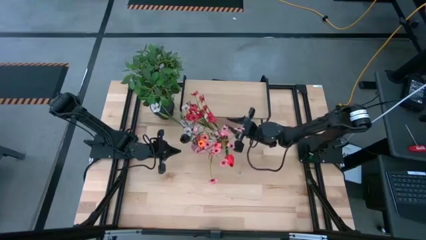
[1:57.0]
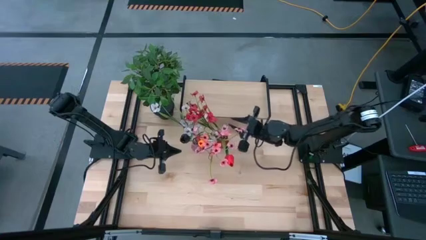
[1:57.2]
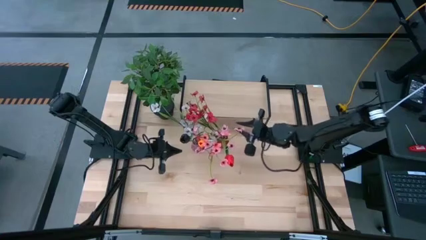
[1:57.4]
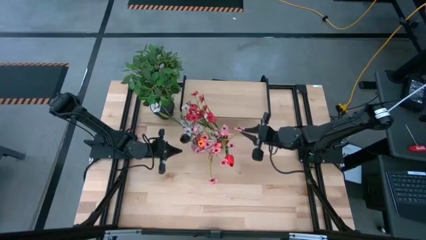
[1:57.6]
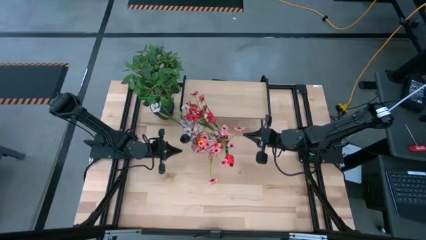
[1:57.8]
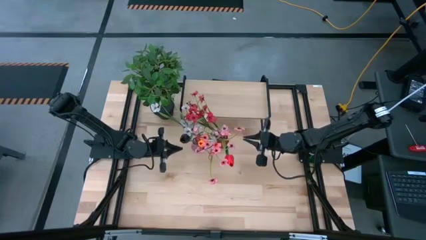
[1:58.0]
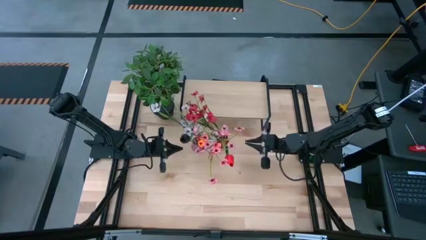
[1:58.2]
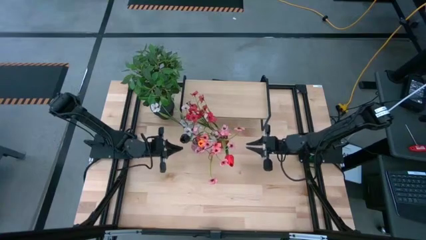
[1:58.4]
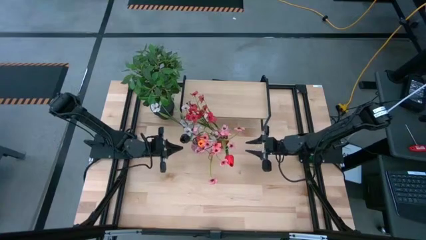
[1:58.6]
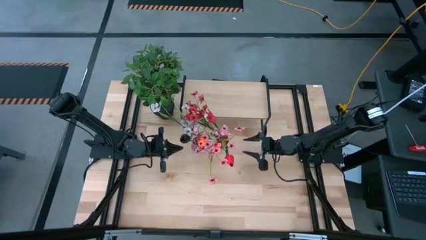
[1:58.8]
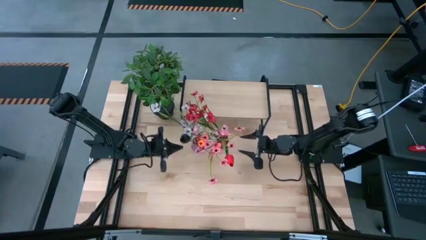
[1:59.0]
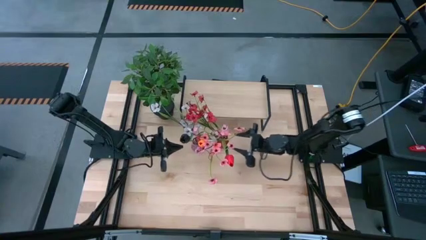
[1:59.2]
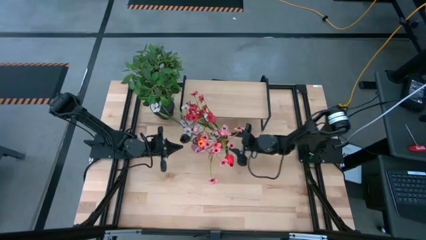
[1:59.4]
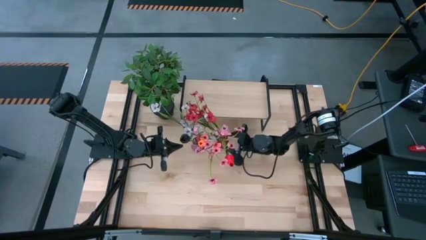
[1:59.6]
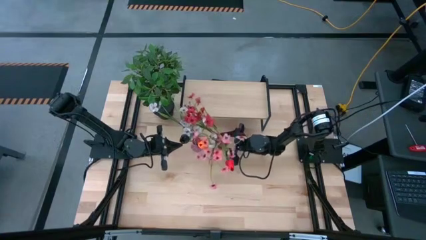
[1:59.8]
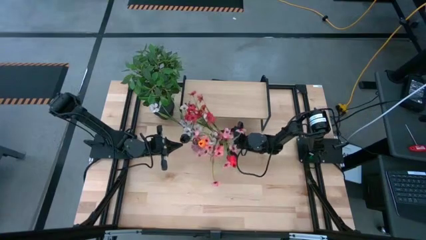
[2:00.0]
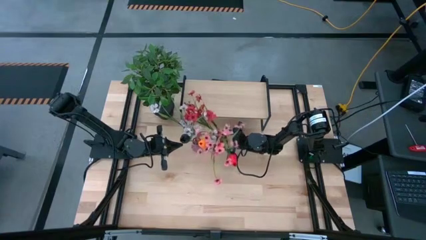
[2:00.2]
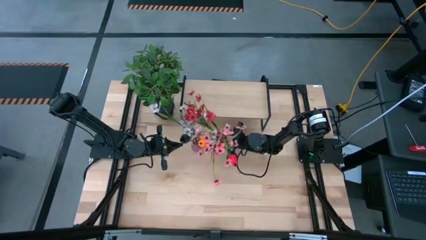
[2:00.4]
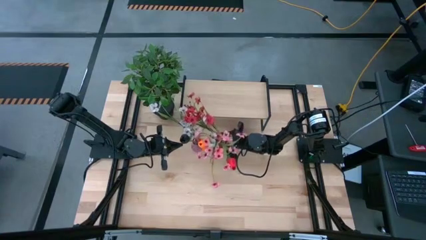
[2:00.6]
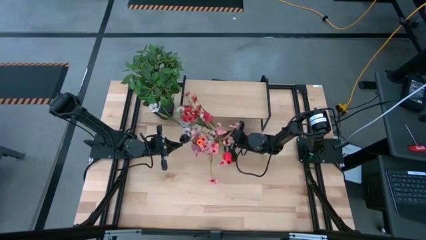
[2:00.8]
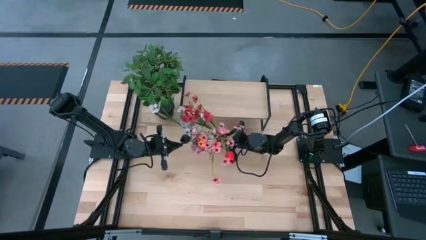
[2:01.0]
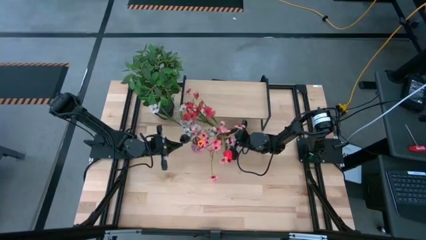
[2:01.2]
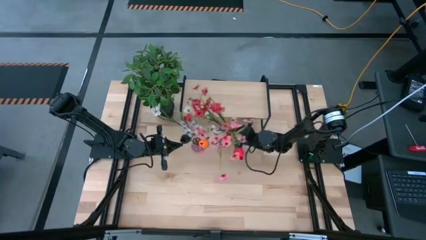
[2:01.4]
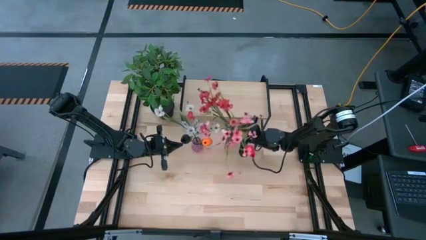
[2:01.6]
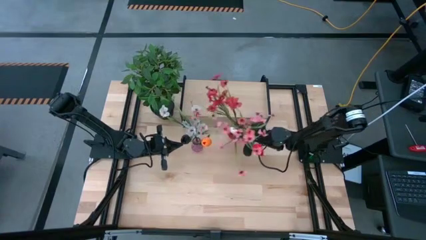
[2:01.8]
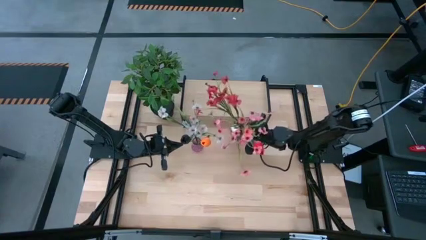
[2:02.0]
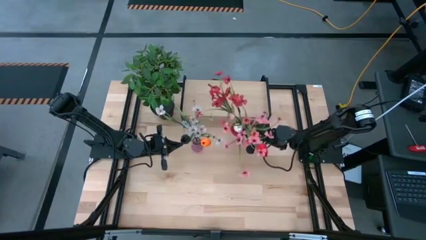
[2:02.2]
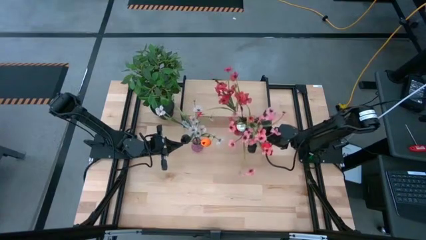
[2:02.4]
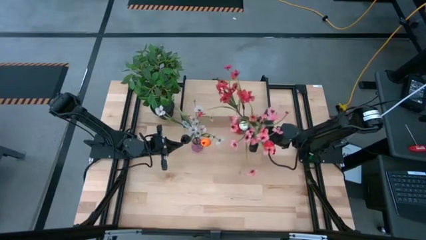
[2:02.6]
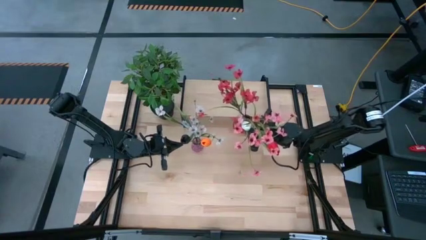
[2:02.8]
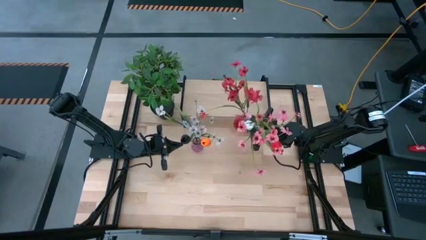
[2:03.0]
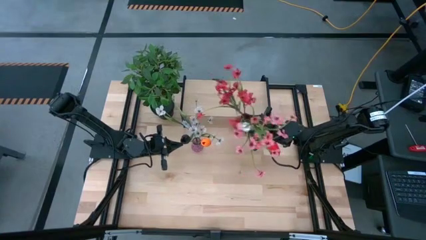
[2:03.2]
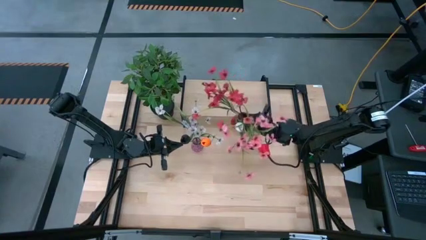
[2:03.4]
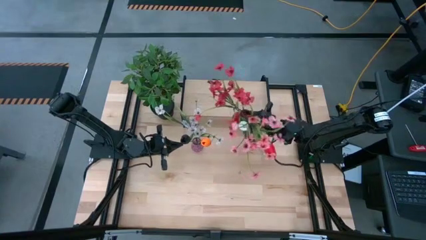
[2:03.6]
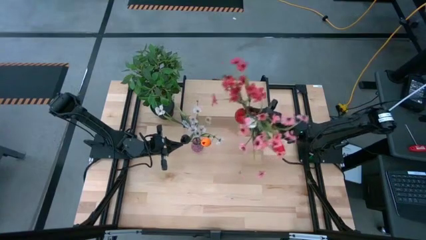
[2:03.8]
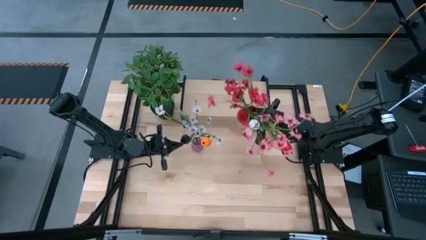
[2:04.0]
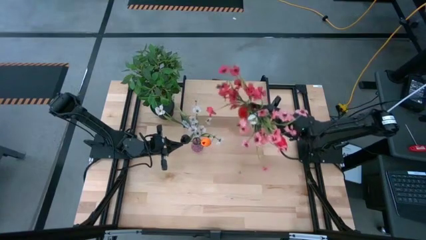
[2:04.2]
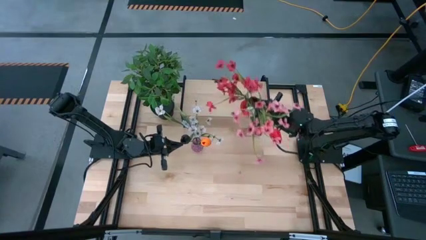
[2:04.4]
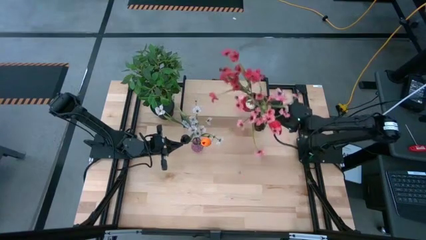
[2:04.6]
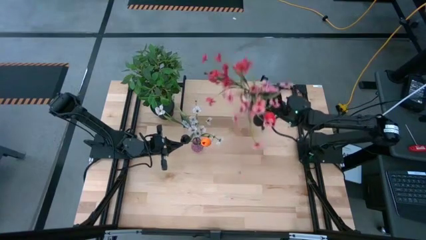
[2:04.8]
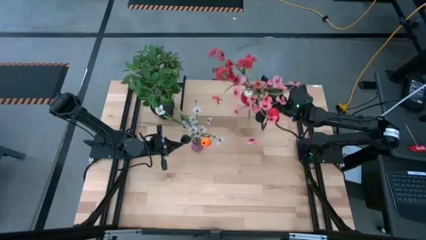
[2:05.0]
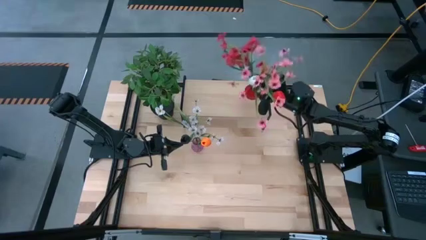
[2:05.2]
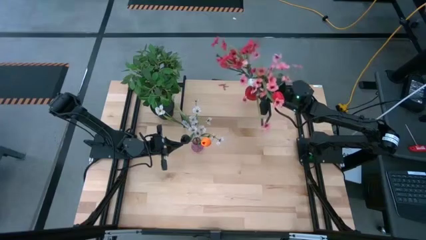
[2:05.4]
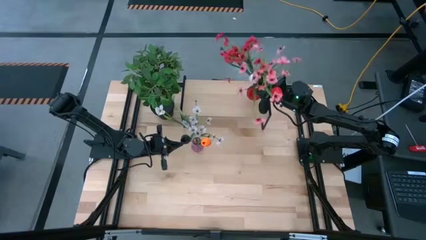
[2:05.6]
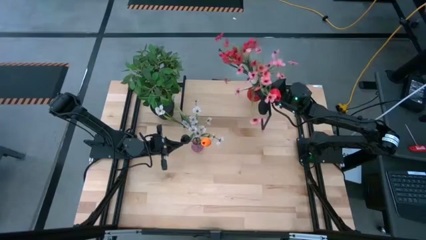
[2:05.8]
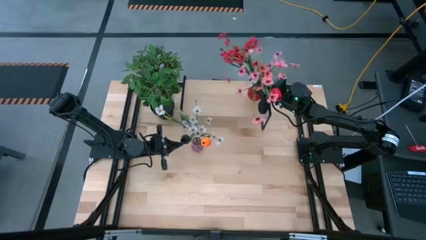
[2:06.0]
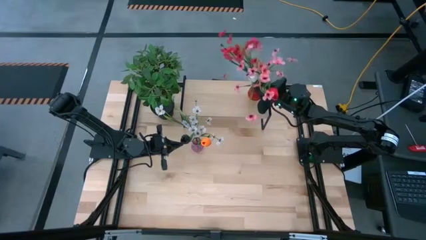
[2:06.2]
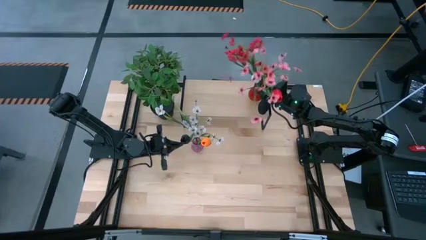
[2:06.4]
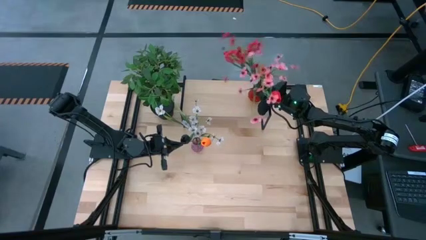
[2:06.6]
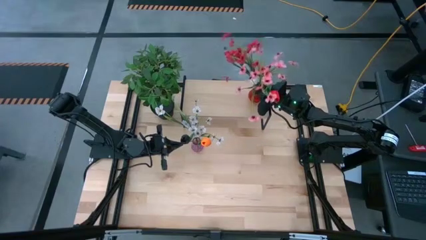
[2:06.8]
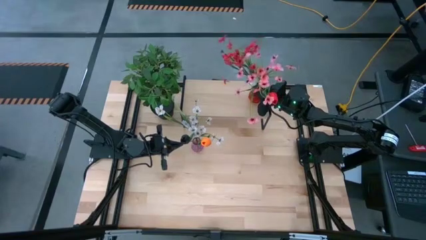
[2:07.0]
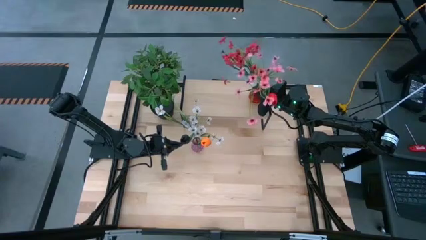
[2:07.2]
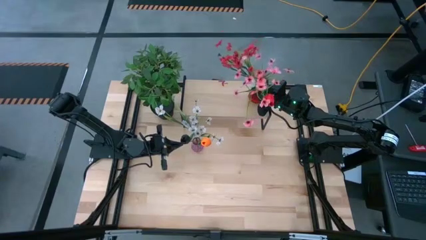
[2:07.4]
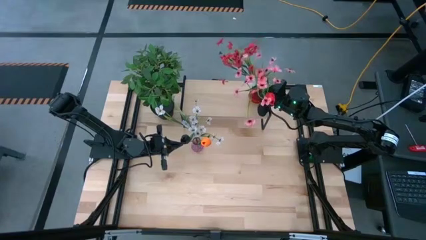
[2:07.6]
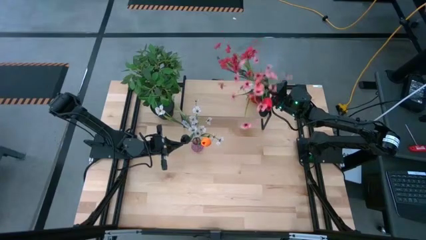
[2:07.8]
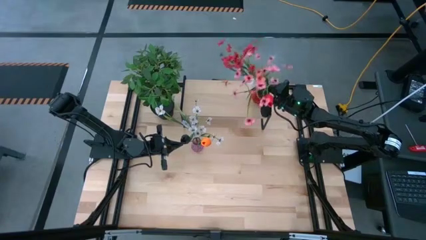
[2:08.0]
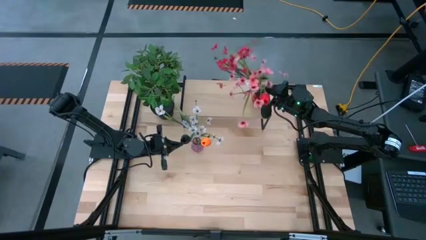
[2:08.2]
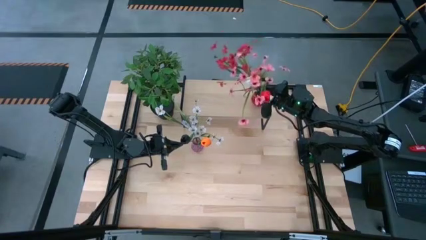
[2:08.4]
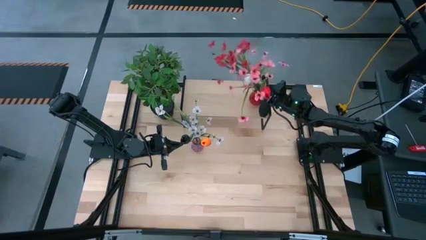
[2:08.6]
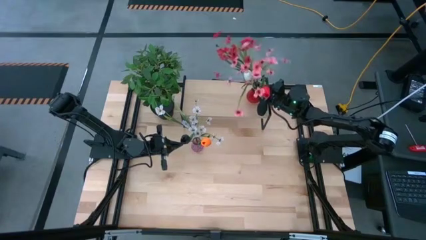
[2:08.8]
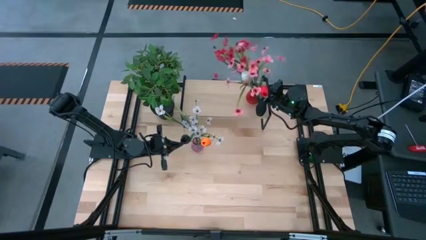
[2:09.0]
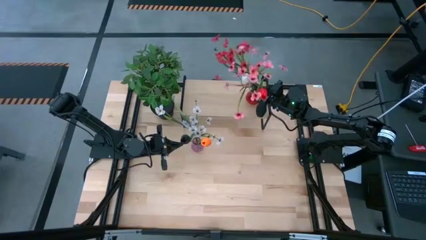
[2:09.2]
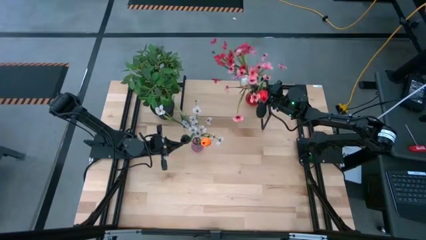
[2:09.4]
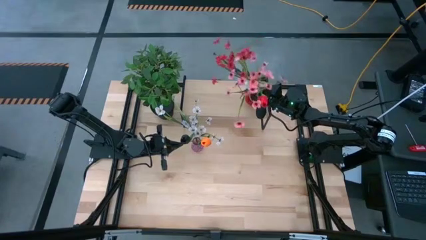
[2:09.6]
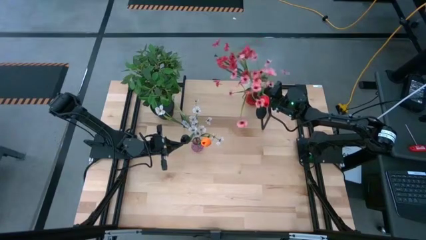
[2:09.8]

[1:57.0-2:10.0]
Task: Pick and place flowers into a vace then onto a shelf
Put the red vase with flowers on the shelf

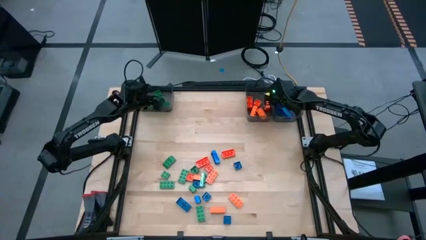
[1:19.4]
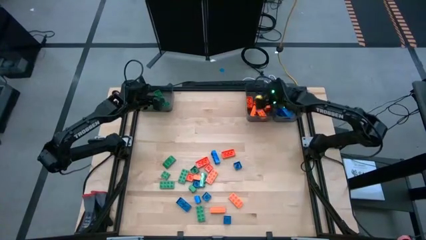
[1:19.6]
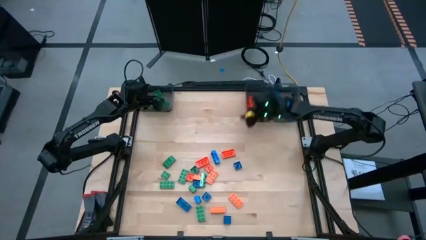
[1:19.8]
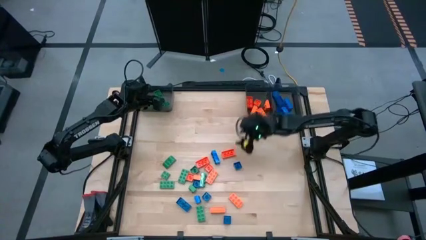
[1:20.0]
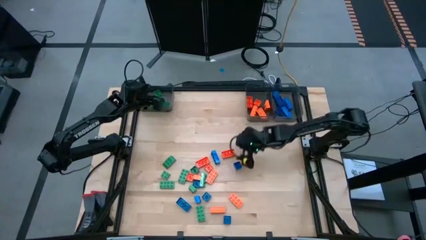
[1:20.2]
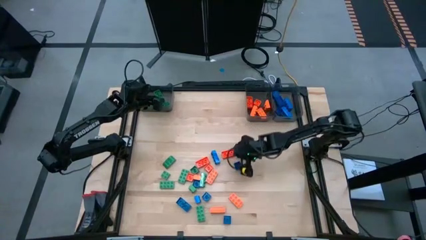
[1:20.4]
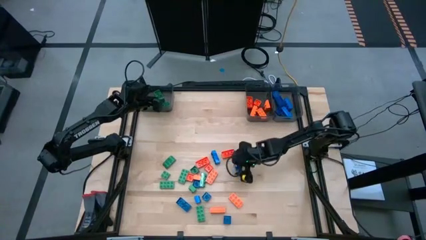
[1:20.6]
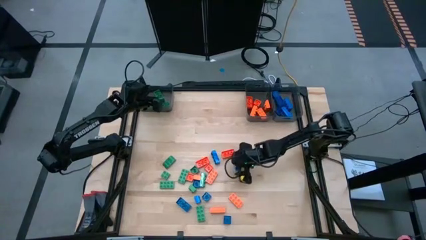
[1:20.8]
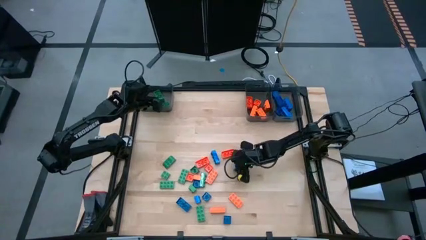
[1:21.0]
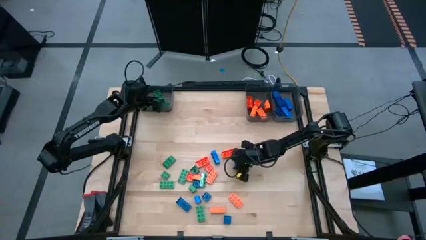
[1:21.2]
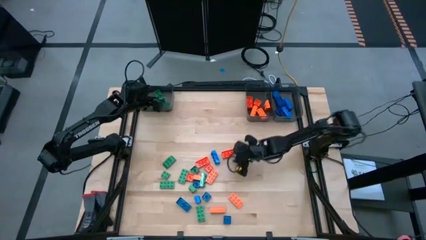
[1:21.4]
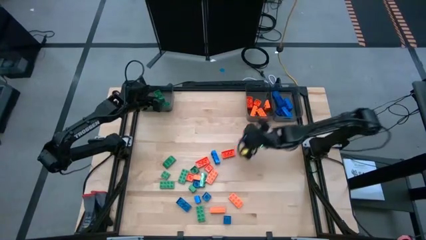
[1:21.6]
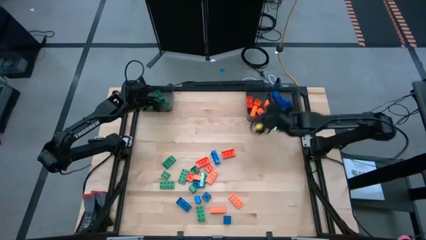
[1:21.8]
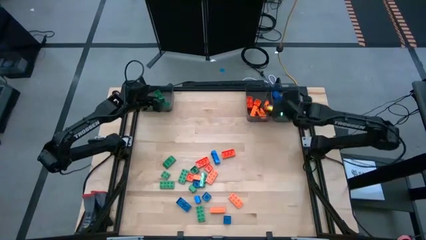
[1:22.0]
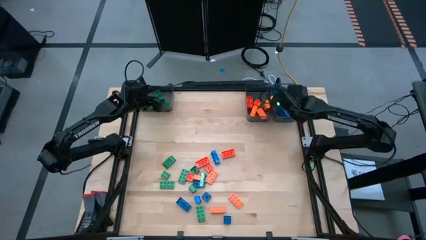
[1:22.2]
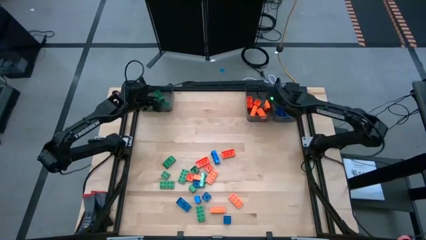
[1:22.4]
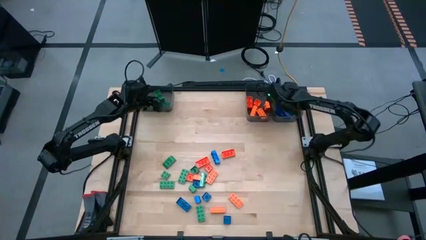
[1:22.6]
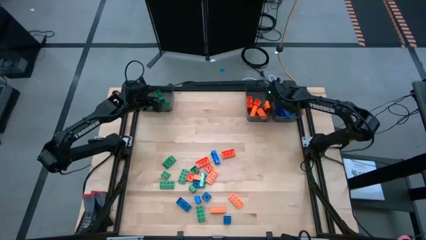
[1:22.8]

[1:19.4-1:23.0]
Task: Sort blocks
Put the blue game piece into the right black bin
